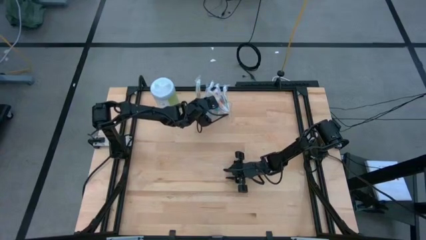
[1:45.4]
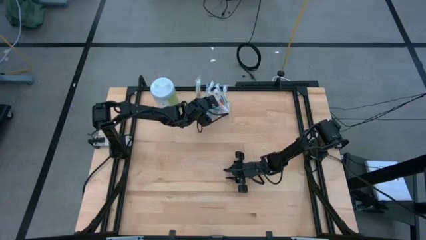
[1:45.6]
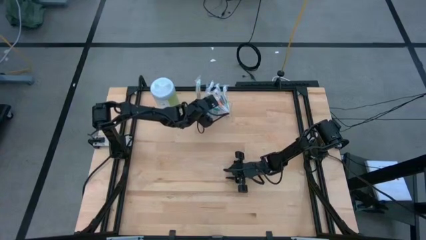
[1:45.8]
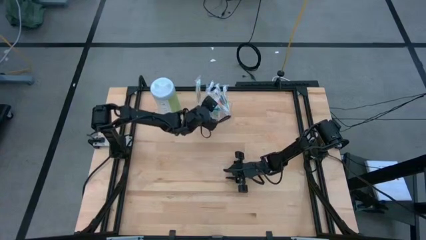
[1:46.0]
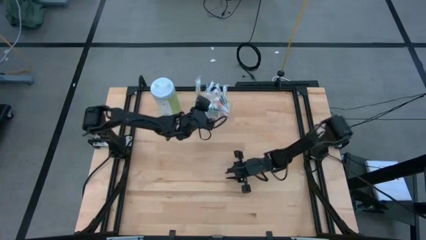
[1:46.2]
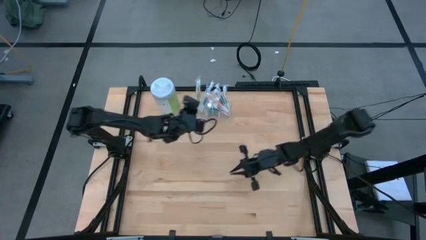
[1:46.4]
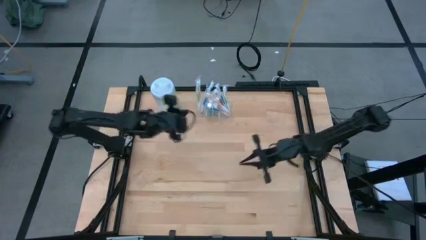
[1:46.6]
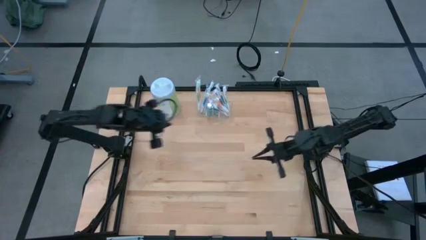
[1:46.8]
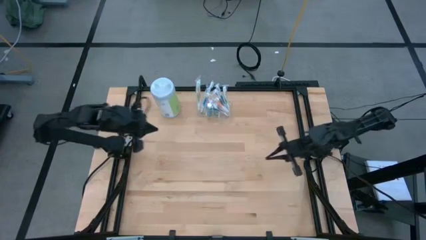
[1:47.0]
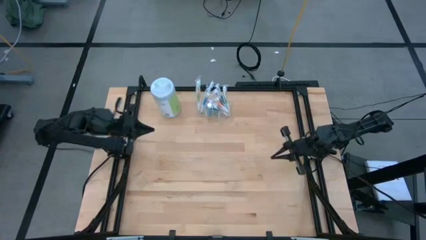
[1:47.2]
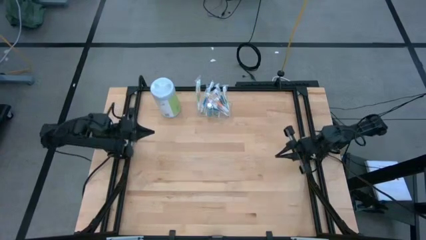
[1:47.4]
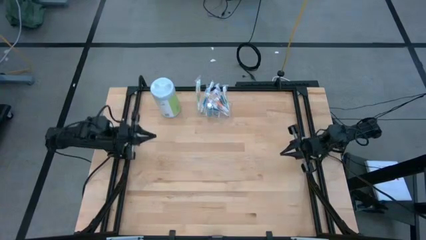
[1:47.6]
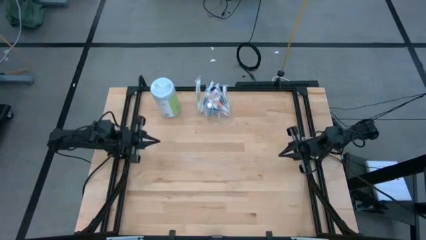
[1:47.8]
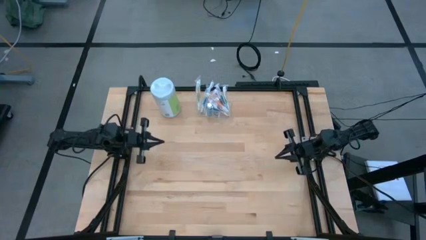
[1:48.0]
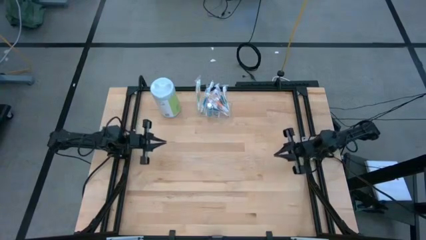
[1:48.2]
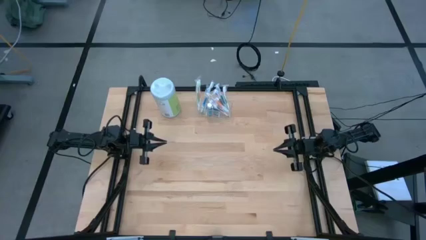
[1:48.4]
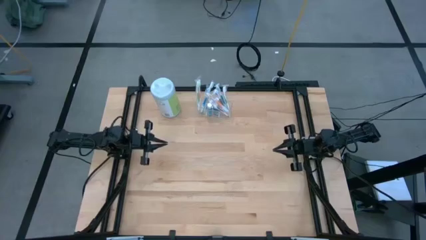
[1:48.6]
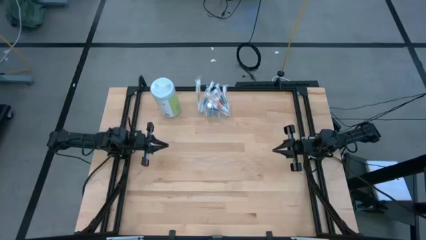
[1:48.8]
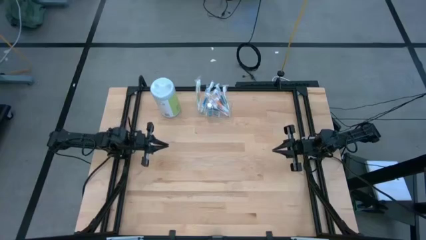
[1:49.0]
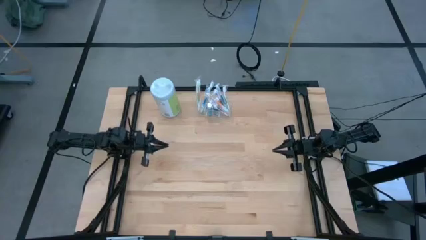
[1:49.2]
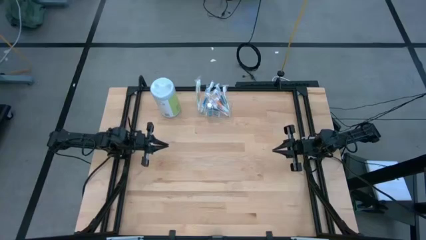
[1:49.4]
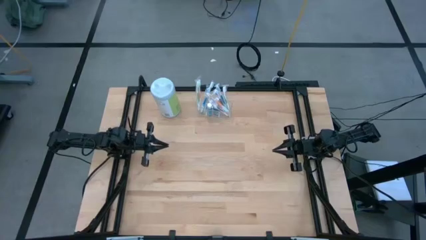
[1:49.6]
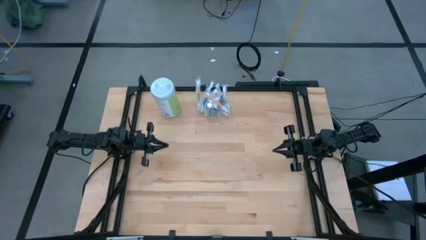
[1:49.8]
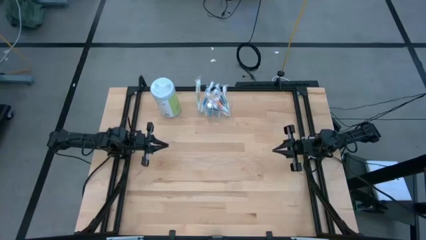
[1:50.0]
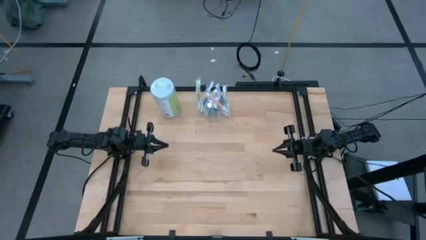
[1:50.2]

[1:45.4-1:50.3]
Task: Pick & Place toothbrushing station
Return to Home Position

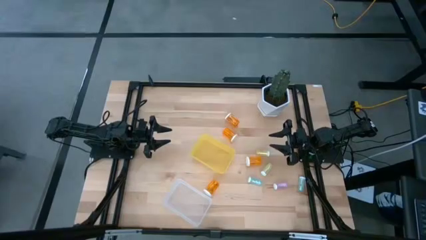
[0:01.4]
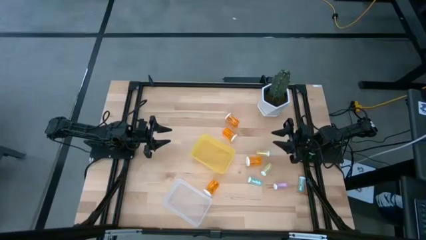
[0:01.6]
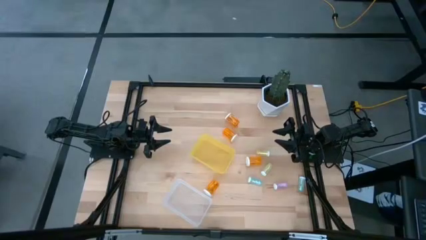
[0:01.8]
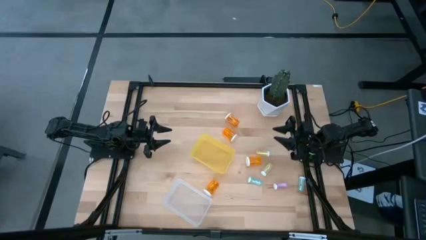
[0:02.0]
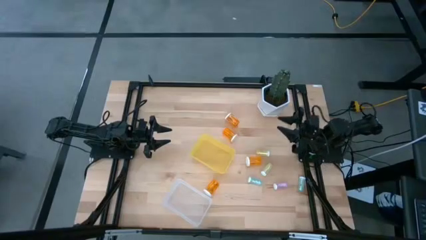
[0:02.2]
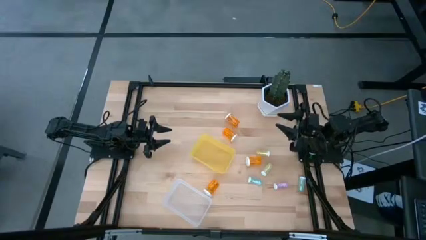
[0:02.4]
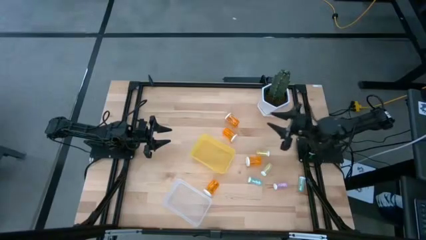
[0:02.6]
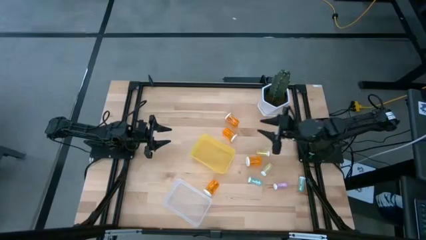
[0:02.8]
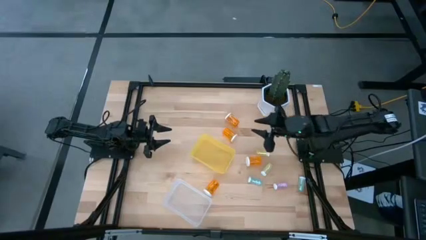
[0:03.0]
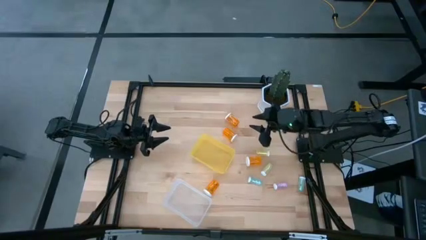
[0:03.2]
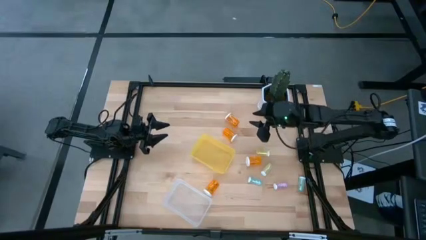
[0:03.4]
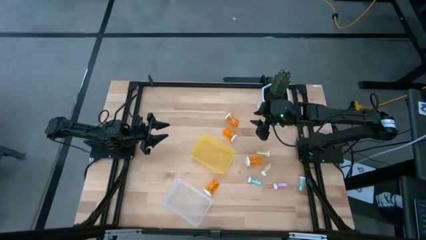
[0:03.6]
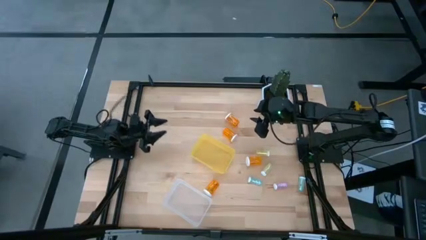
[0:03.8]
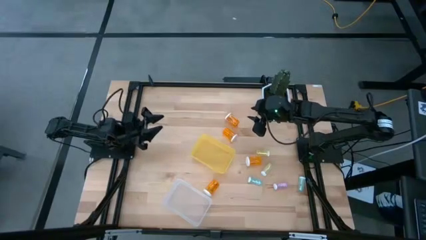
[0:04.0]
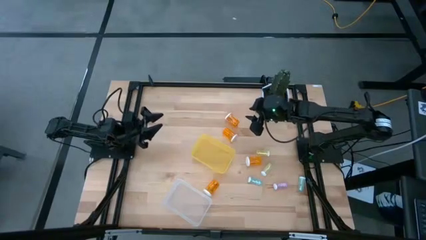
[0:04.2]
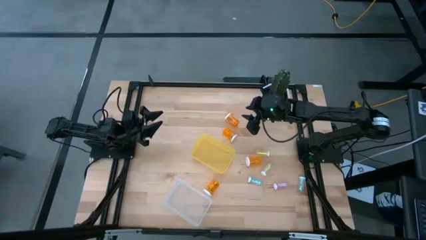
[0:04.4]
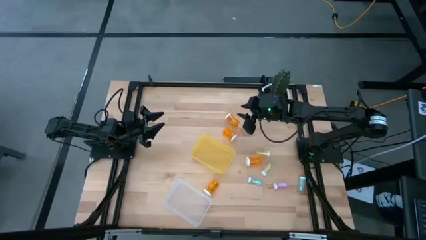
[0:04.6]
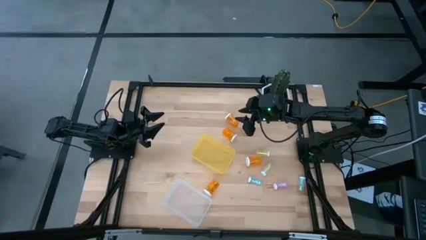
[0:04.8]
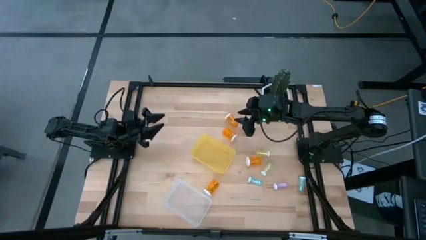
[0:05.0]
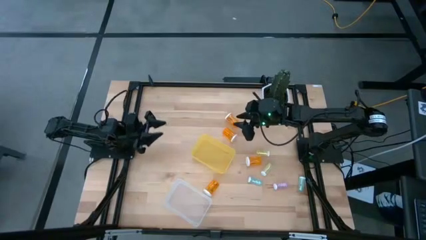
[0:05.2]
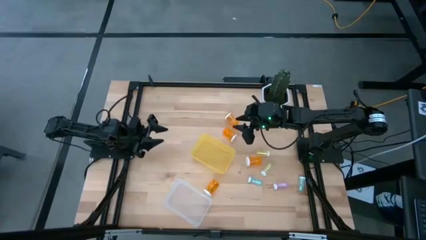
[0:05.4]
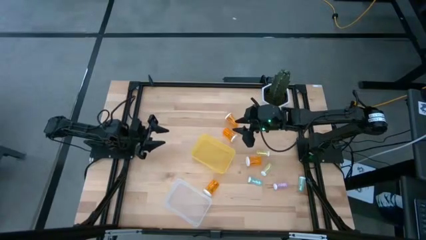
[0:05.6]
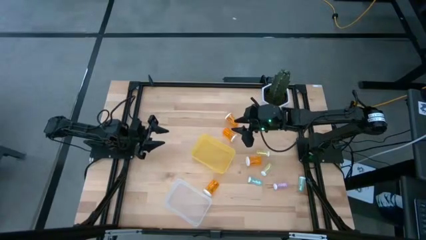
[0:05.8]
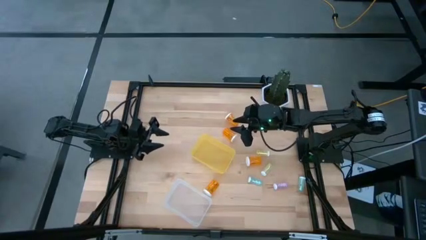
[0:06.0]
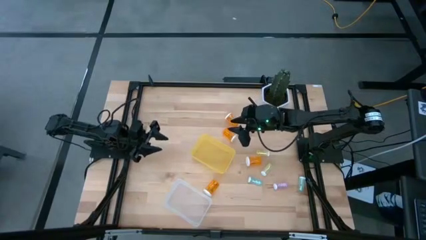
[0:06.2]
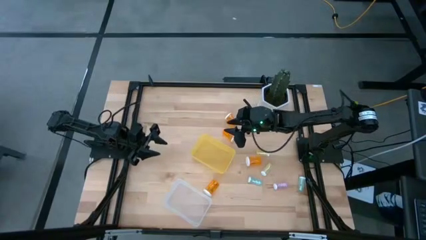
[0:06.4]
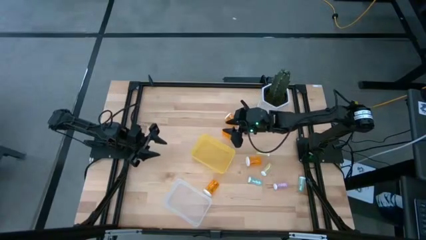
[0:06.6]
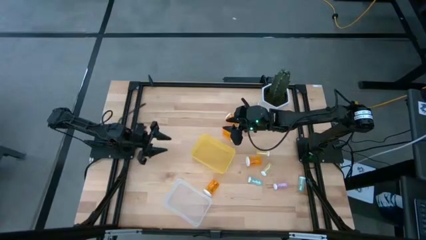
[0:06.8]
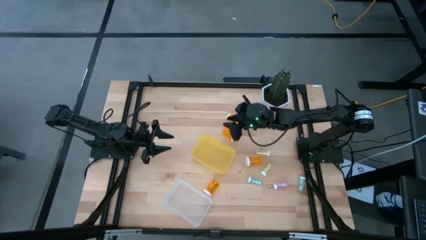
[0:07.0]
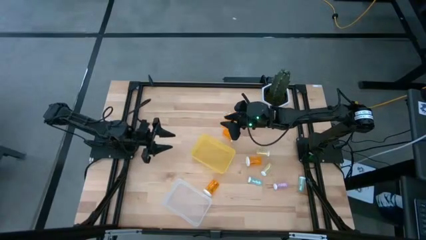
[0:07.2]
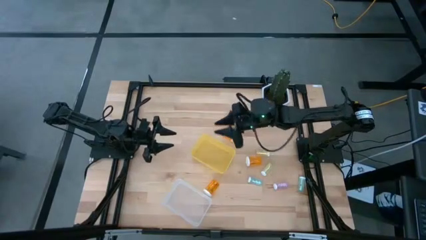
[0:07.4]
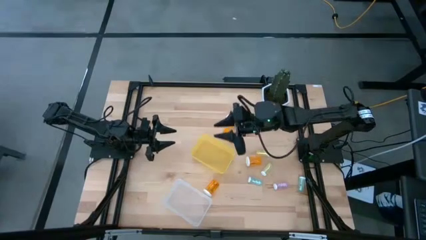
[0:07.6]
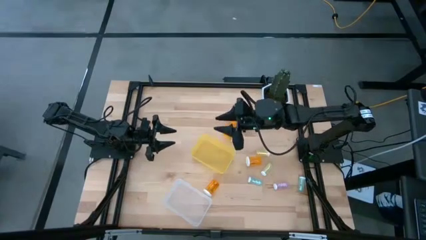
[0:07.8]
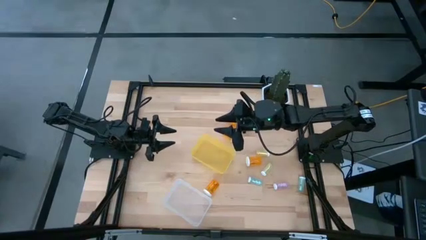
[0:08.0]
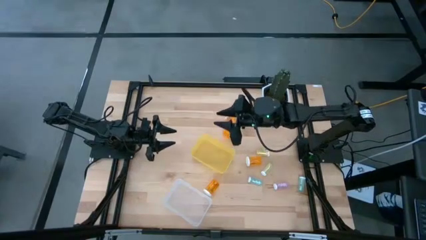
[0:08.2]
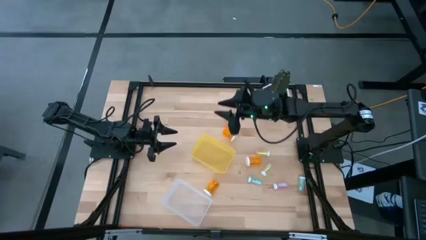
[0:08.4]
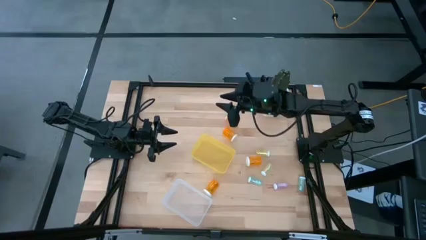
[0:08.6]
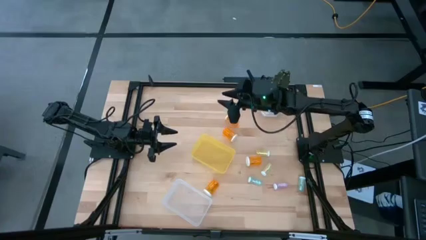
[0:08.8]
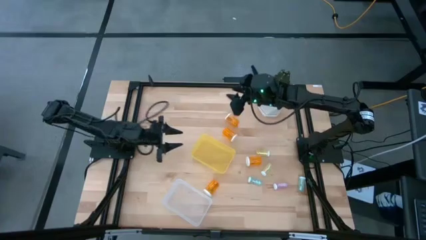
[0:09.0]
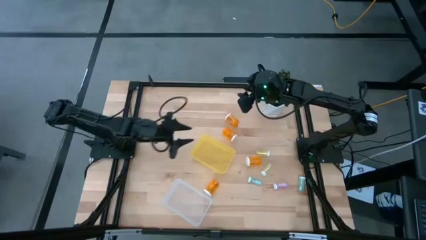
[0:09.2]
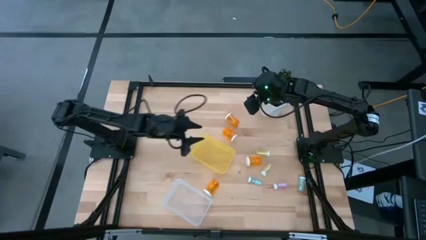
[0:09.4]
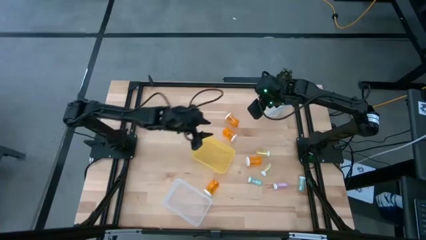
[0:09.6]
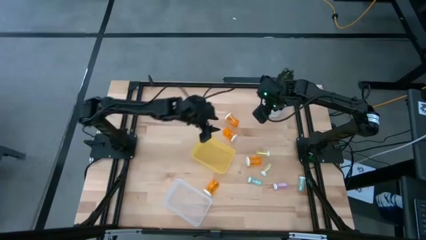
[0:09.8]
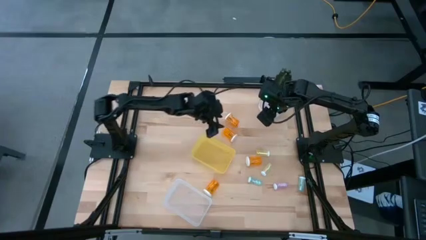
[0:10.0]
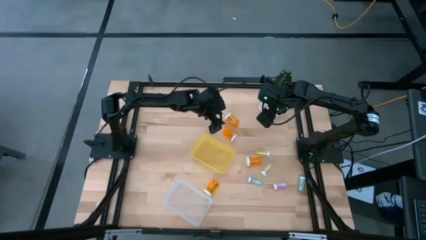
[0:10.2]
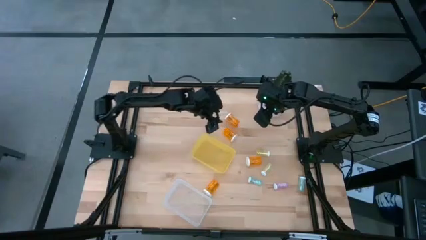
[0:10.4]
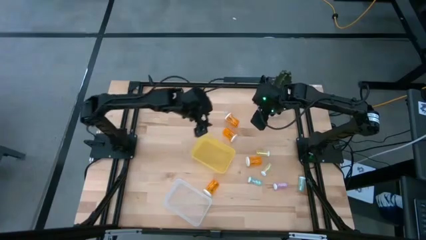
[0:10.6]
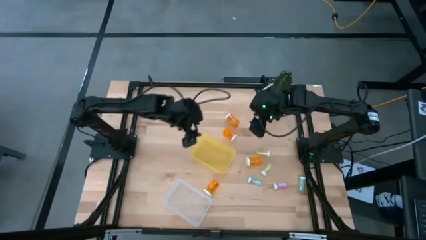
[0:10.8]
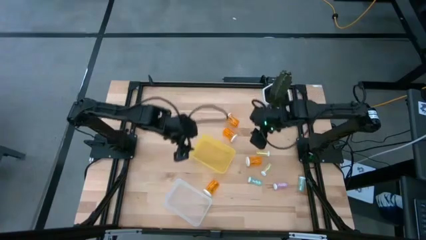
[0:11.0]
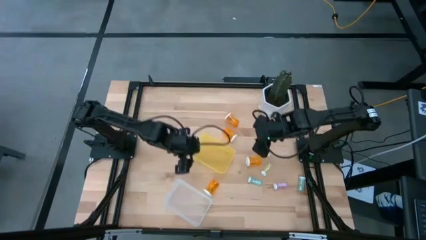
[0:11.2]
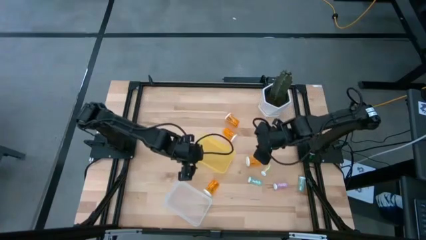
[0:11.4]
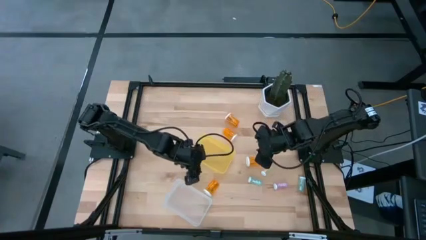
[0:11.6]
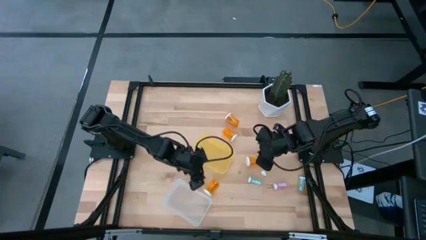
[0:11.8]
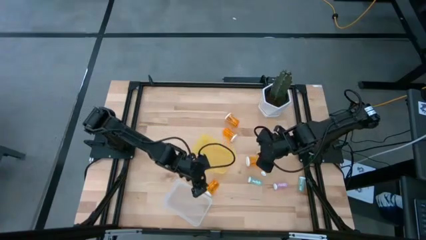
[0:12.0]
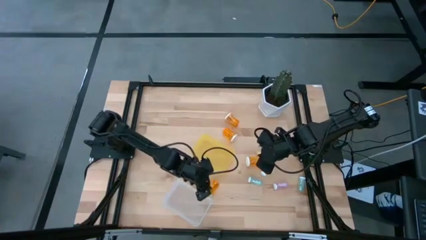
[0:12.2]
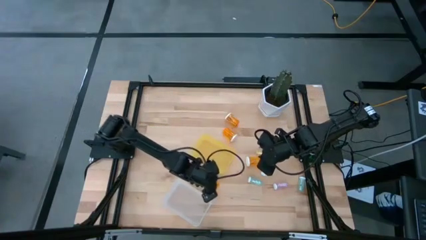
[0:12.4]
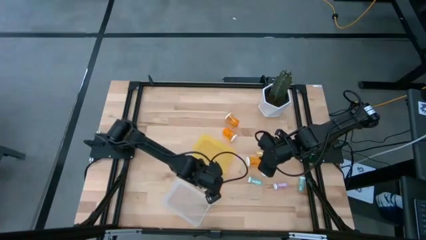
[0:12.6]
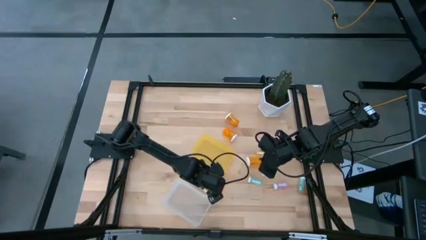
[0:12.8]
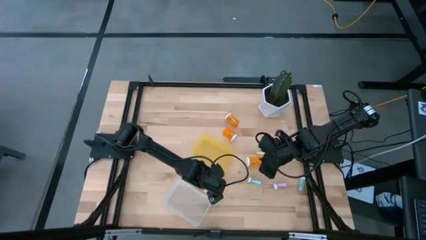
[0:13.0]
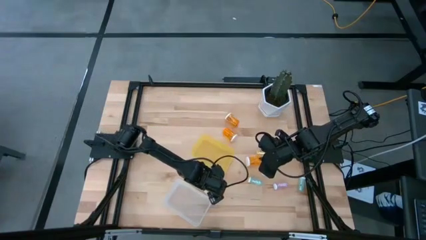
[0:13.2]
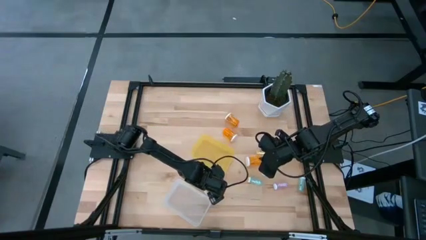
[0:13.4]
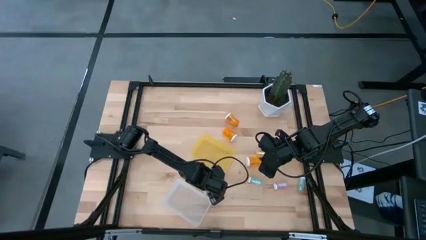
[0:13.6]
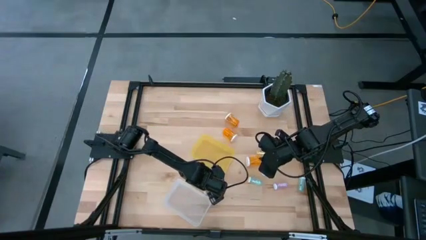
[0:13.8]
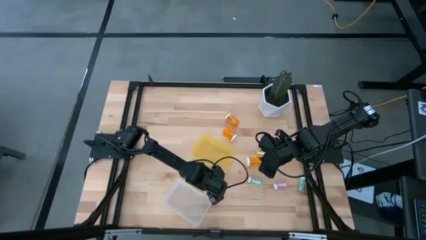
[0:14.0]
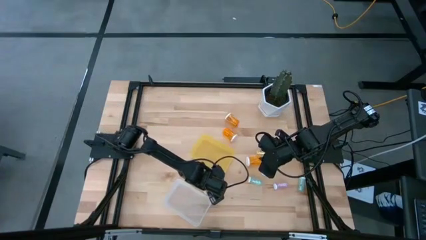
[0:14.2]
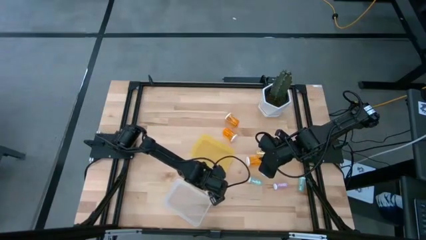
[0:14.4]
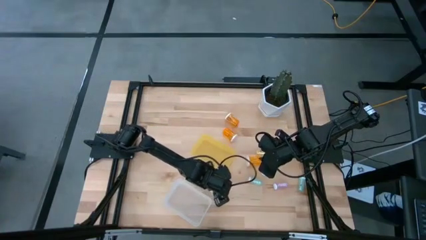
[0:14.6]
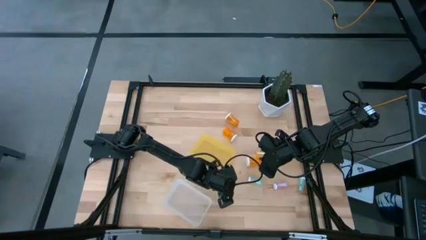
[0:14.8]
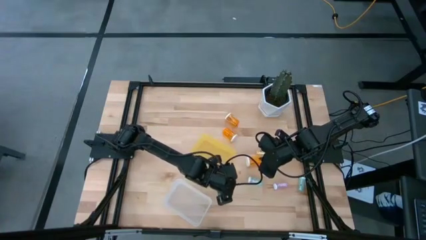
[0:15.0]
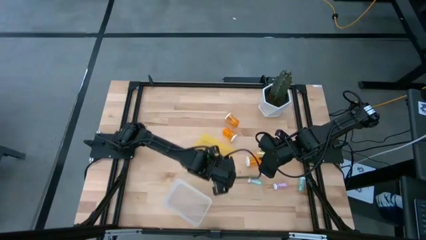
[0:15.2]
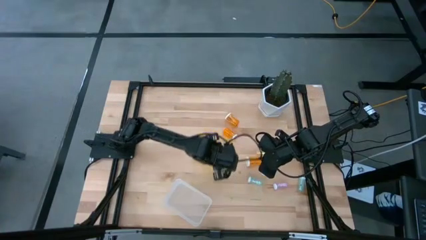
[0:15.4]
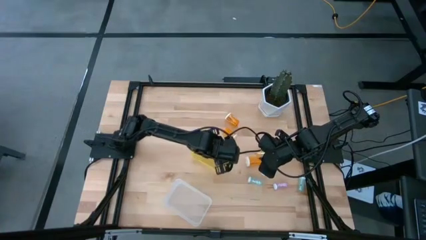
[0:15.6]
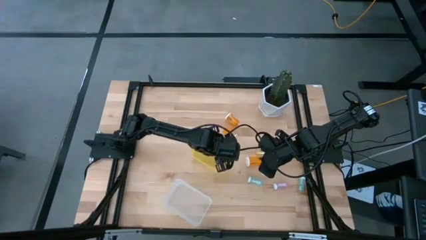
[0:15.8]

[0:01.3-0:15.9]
Task: Pick and place medicine bottles into bin by pill shape (circle, oval)
Put the orange bottled capsule into the yellow bin
